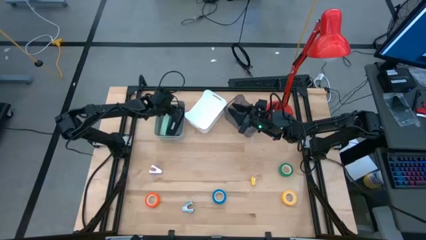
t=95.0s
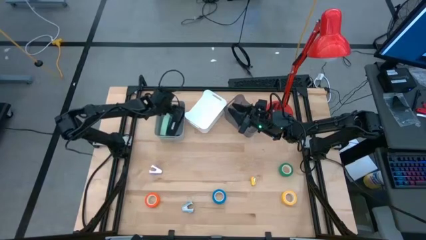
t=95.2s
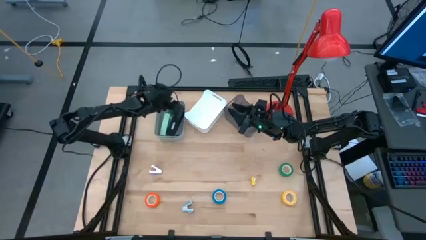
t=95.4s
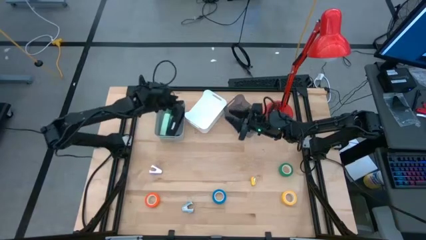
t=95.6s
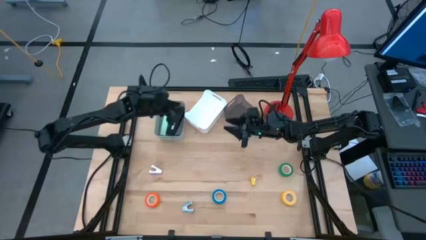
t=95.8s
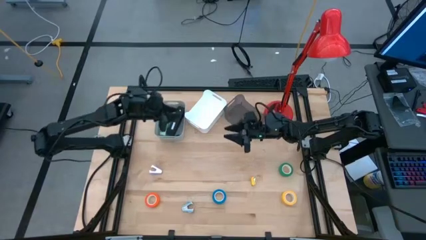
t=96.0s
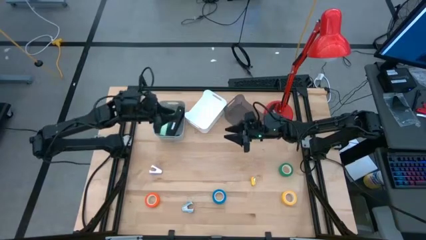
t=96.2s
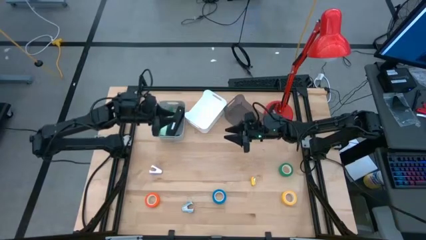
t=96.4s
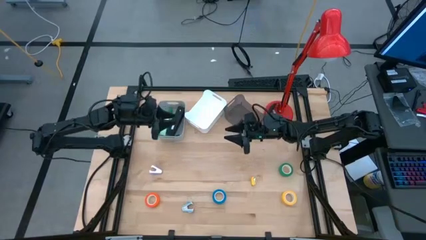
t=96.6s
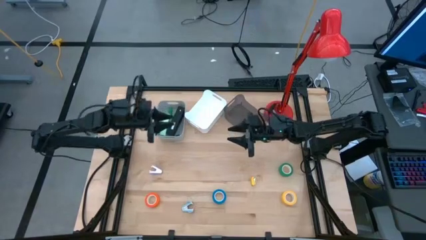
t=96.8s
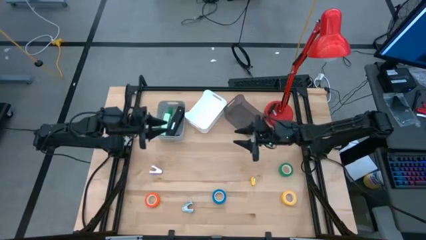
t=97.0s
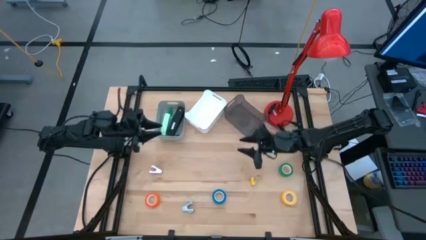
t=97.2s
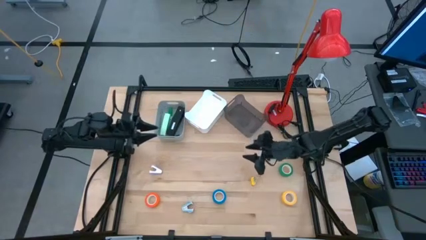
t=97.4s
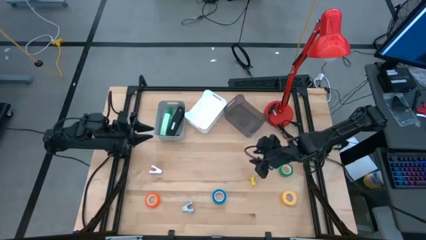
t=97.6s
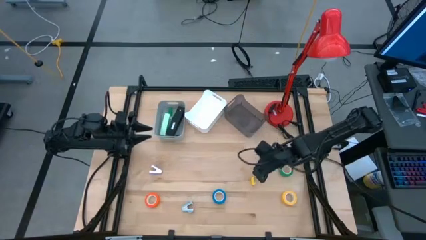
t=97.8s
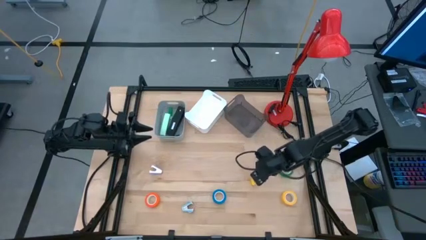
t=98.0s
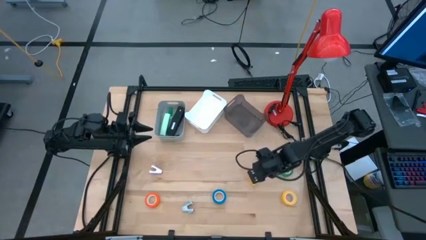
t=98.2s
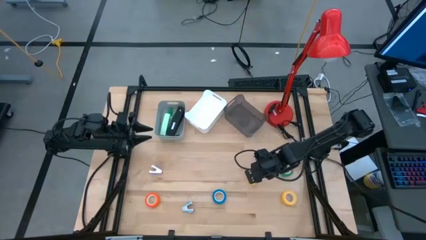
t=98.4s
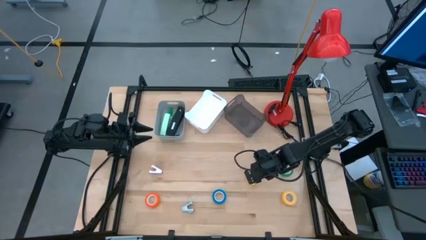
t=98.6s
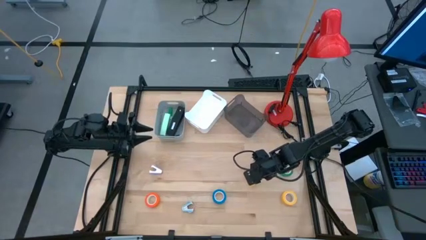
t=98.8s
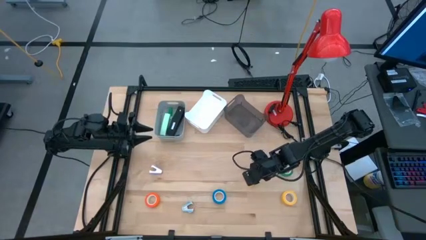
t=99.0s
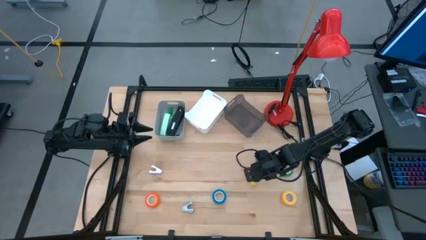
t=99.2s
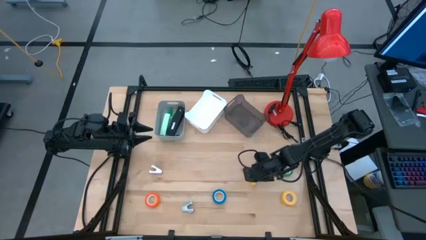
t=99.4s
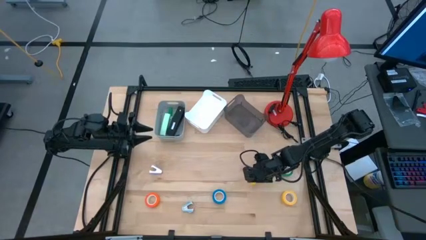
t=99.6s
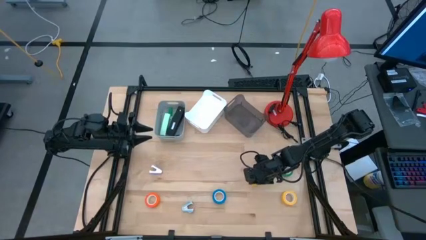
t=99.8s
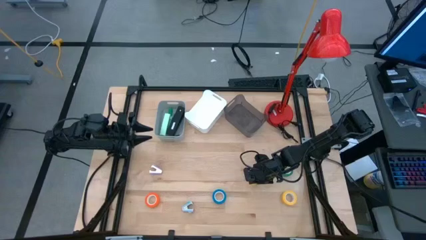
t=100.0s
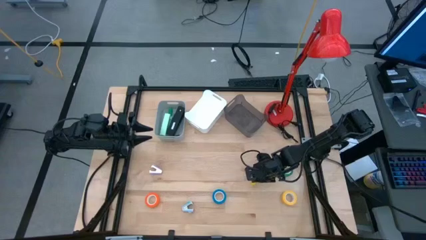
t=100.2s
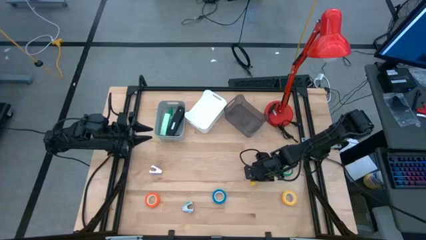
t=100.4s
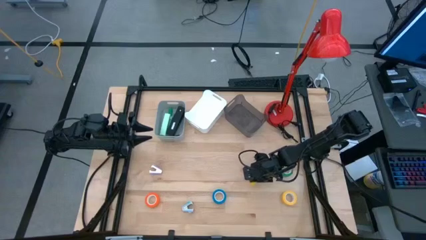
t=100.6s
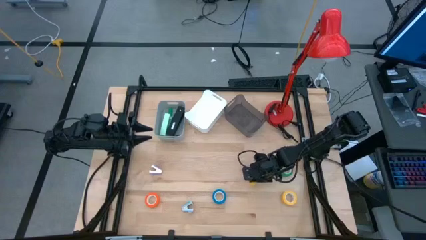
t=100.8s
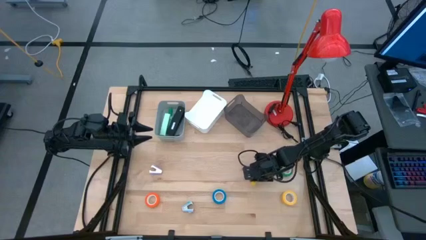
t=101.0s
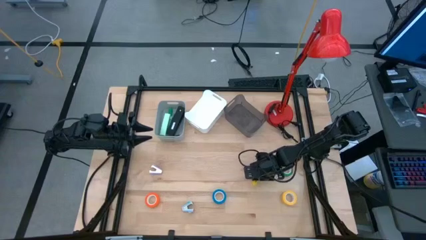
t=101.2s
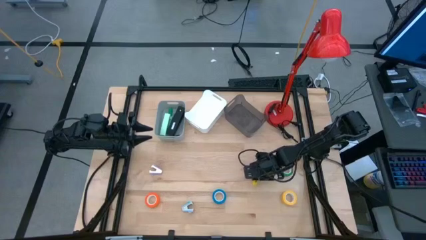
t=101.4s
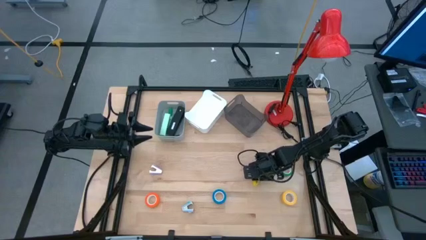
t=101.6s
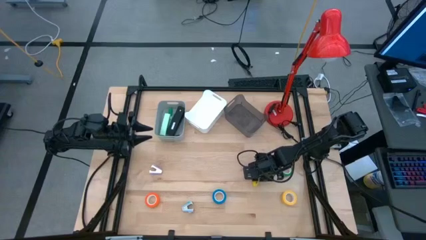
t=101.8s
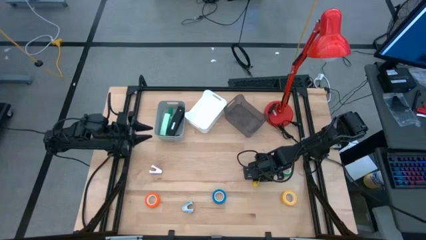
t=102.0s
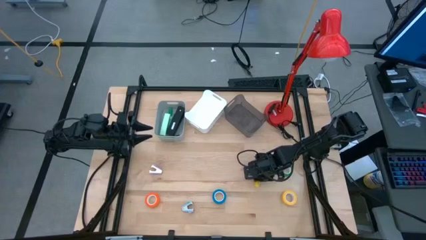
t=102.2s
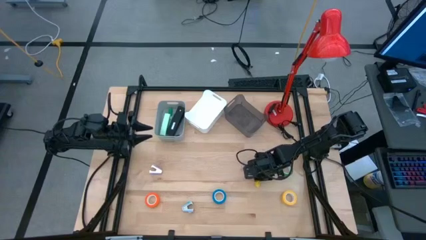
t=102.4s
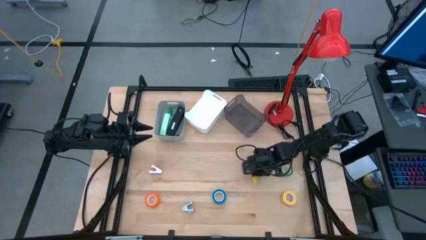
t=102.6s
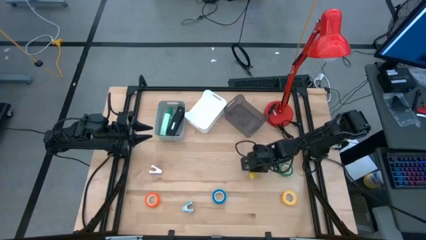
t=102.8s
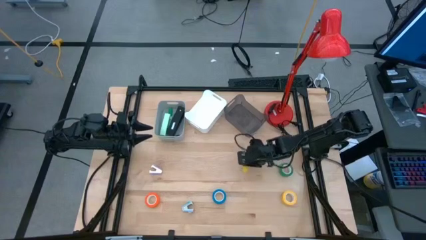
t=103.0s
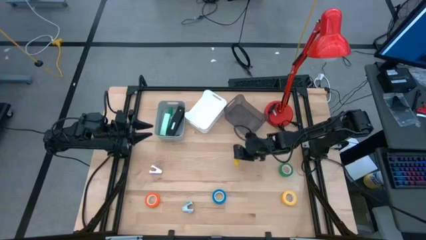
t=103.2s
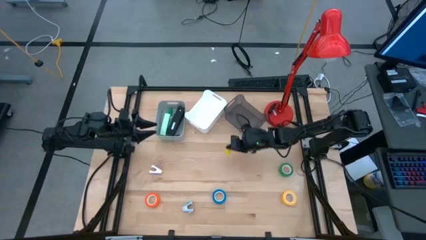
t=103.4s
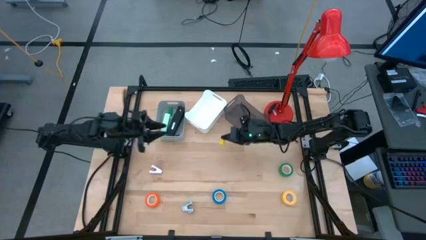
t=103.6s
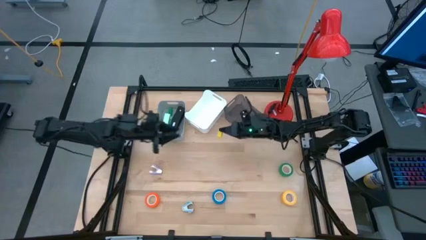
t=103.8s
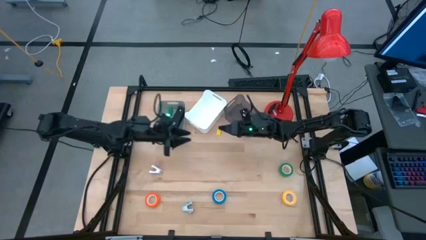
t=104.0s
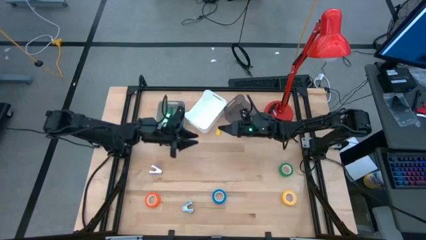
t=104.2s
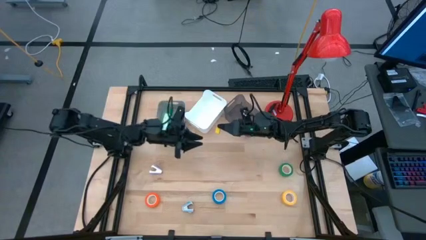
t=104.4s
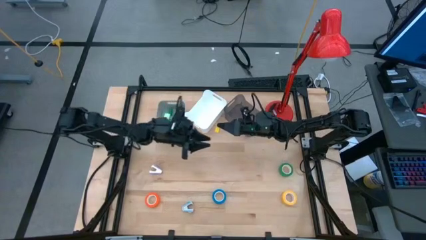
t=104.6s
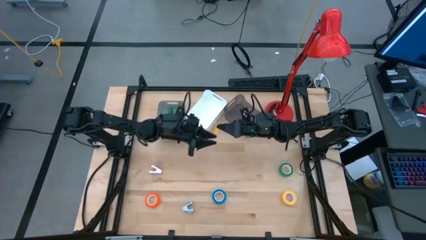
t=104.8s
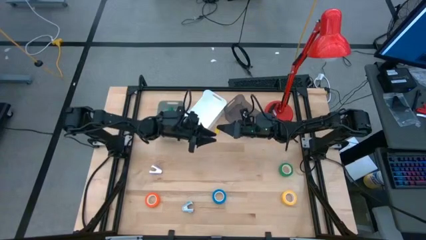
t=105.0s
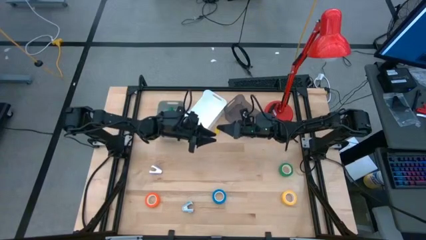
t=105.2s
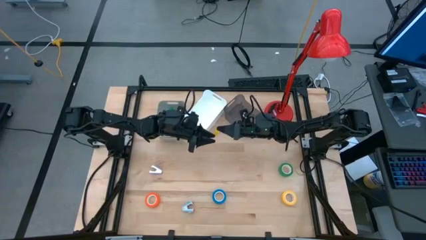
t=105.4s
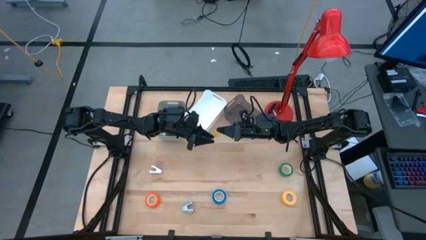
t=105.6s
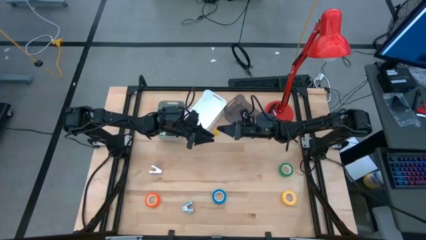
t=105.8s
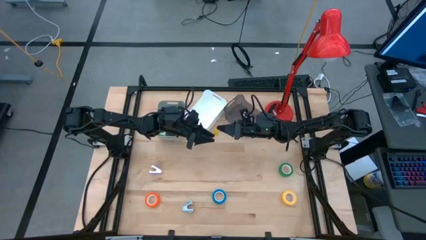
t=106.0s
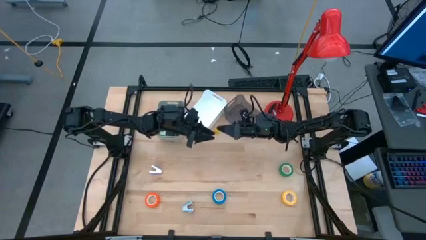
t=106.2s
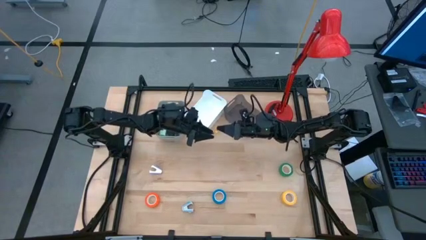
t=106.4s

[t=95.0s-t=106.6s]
Task: Pick and place Stapler, Stapler remover, tape
Put the small yellow stapler into the gray bin
